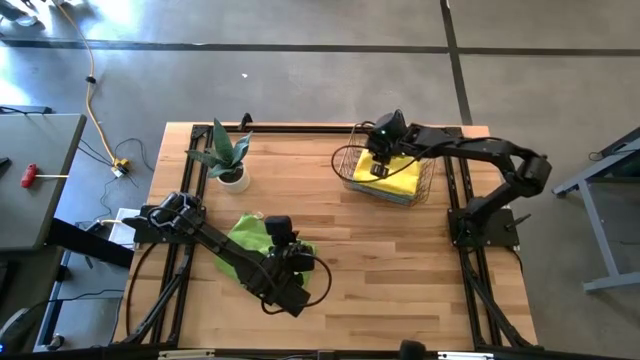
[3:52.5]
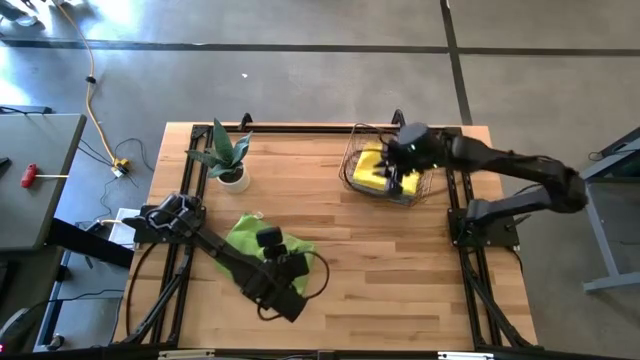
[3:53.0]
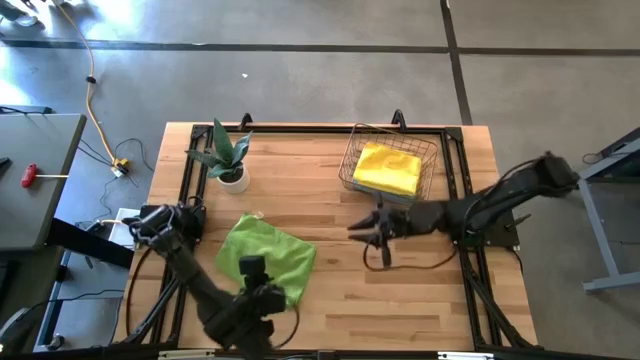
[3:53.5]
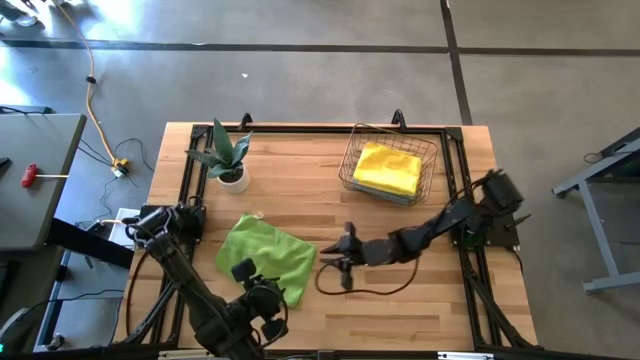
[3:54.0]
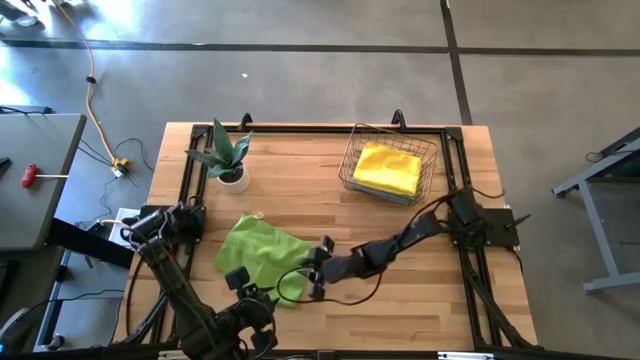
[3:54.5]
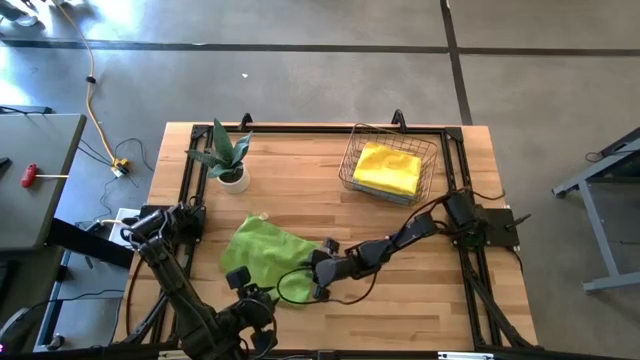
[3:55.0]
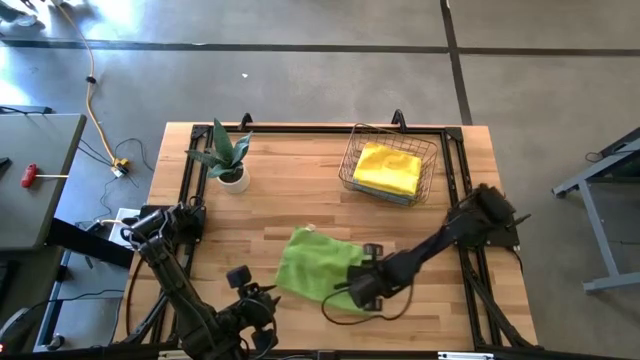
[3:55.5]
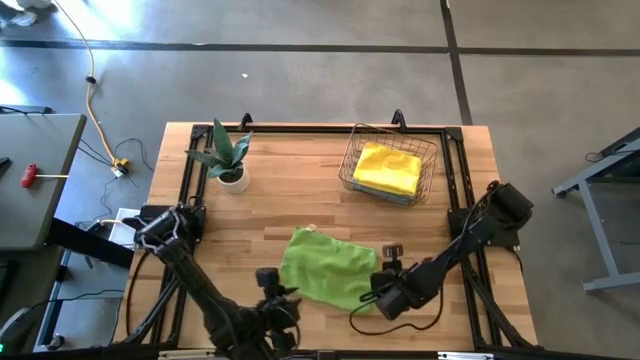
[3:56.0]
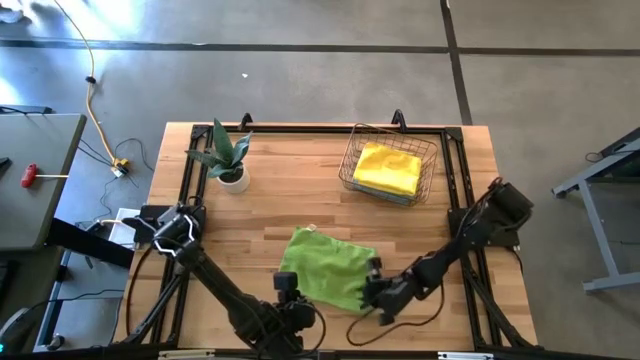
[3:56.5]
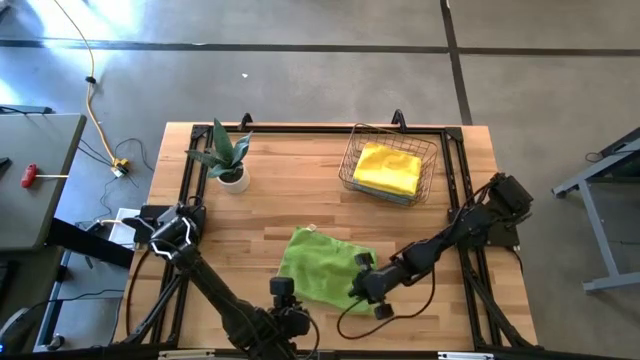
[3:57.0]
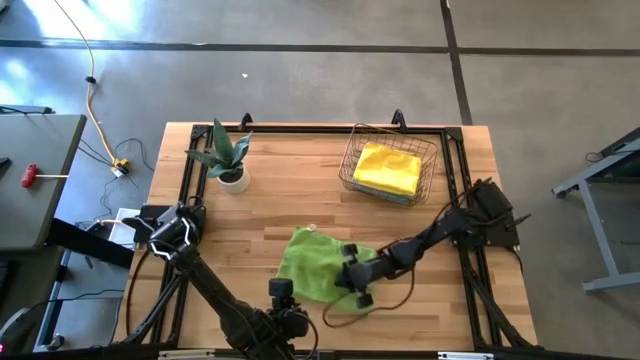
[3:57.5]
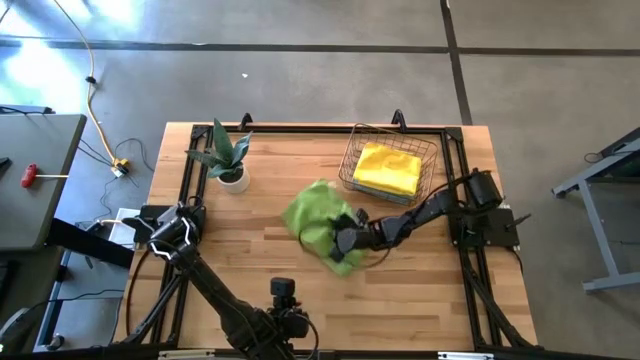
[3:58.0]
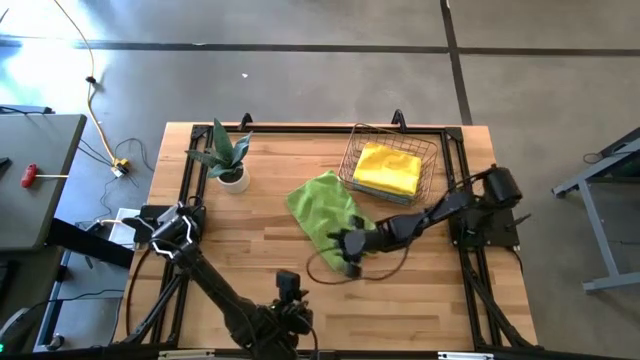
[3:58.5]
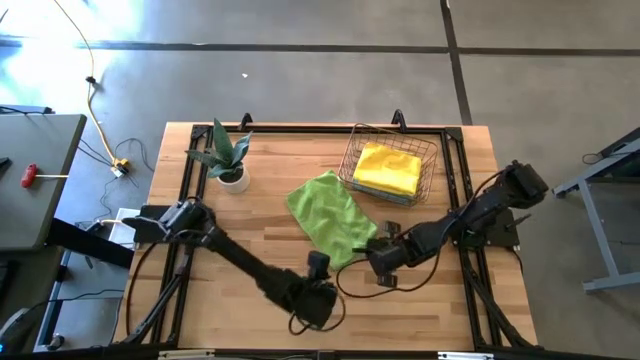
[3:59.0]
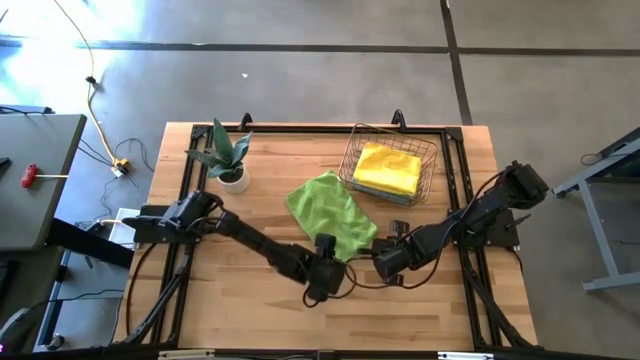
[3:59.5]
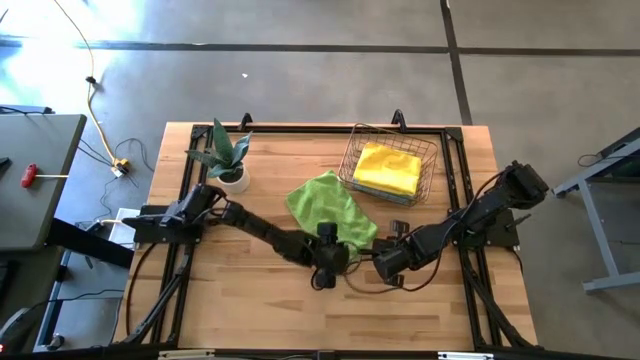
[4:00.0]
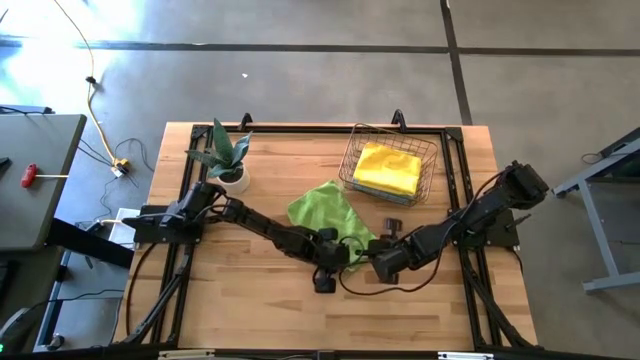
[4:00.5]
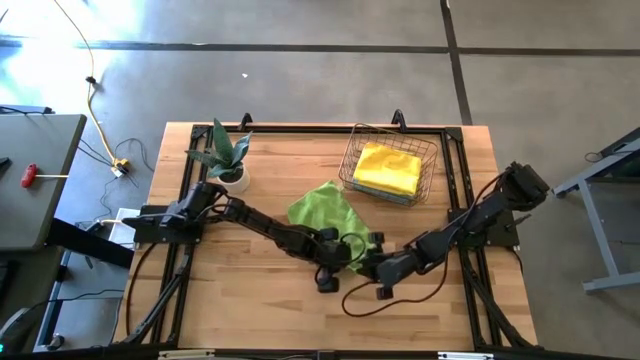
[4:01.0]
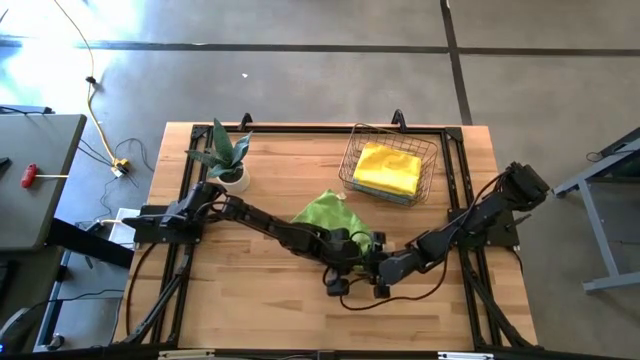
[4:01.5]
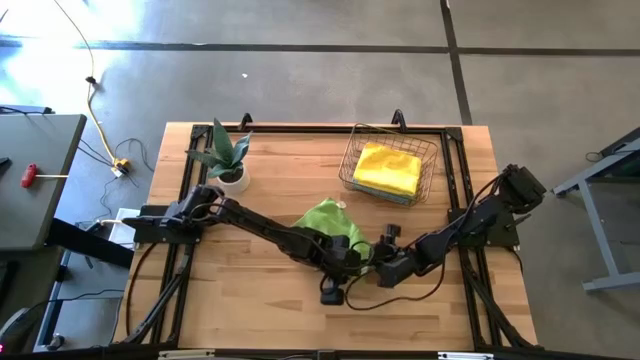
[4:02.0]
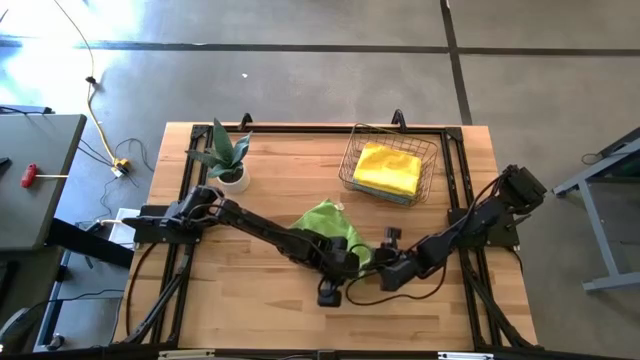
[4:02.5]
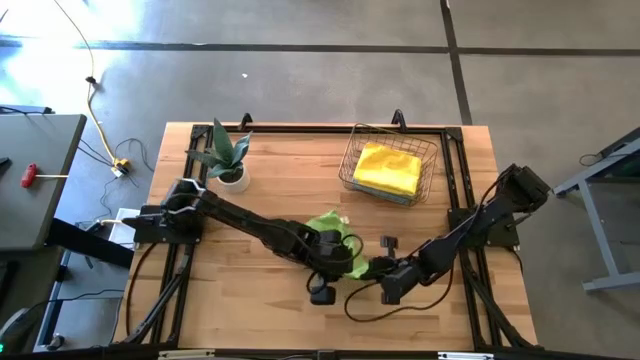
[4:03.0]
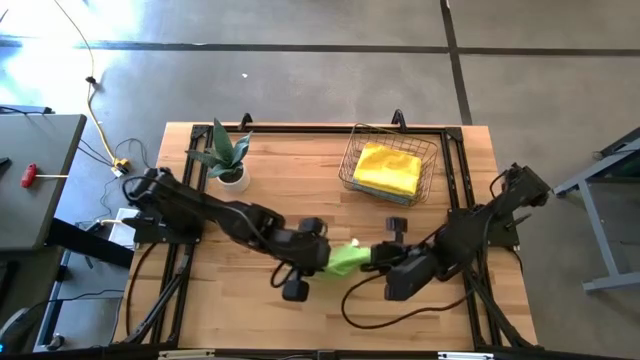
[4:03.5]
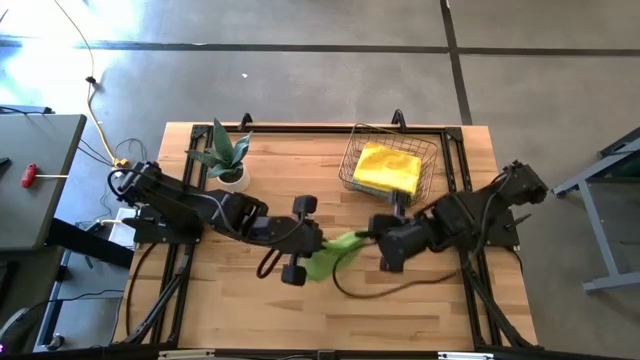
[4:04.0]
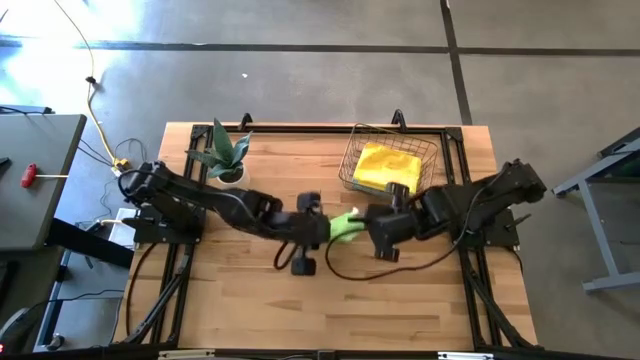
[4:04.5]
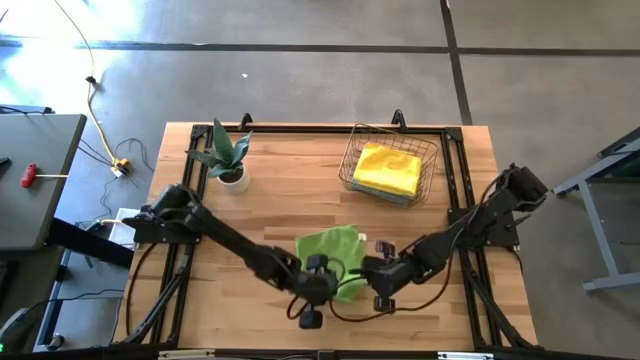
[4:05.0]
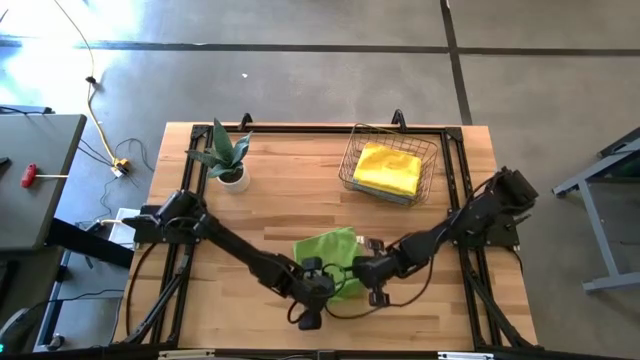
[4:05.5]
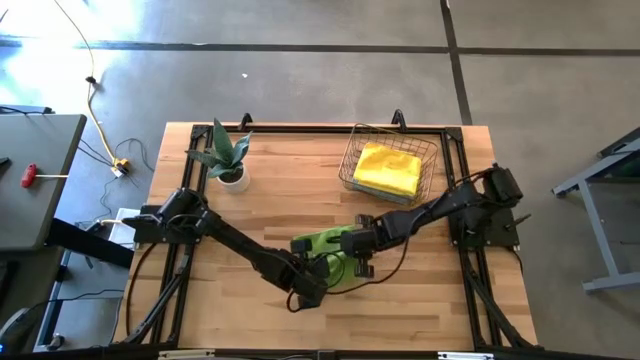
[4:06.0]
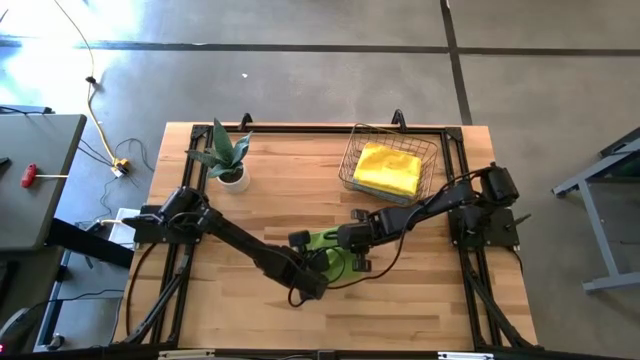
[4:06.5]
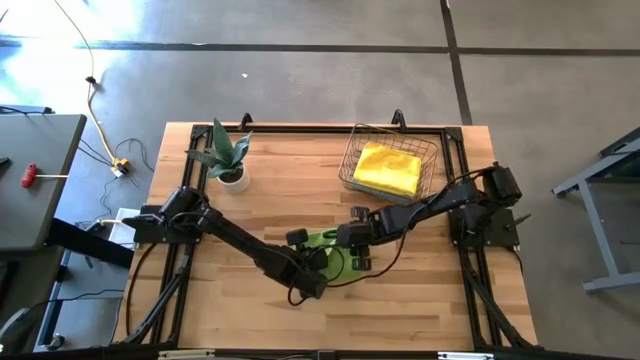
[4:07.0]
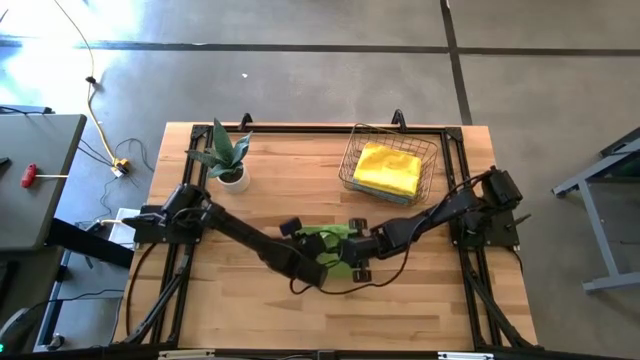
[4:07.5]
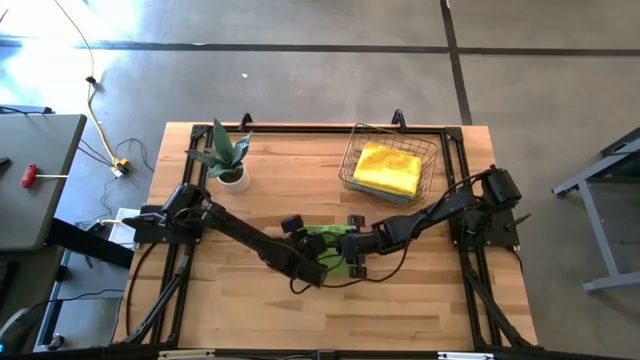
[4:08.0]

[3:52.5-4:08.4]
Task: Fold microfiber towels
Fold the green microfiber towel

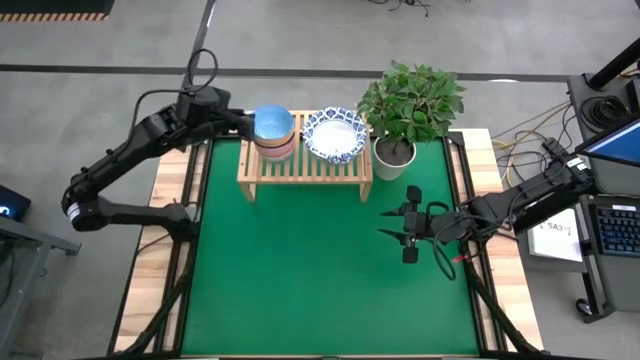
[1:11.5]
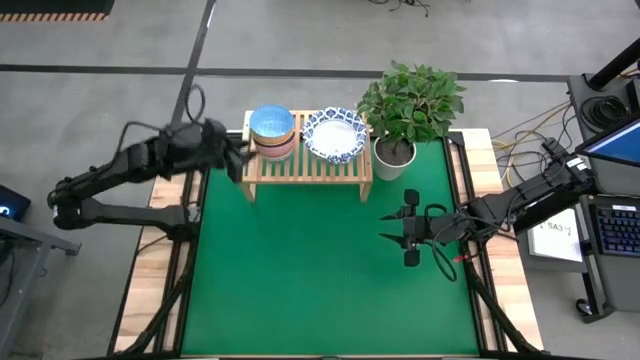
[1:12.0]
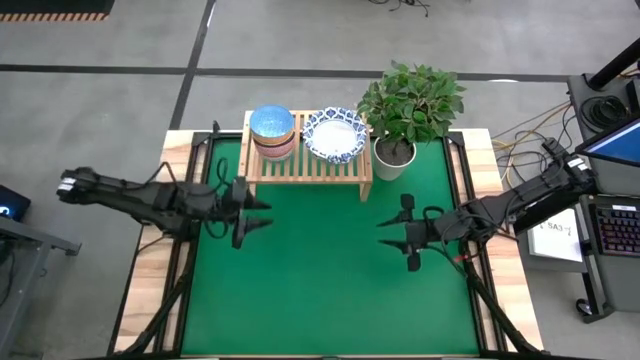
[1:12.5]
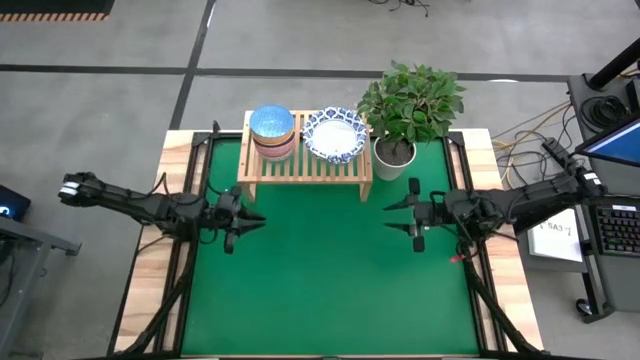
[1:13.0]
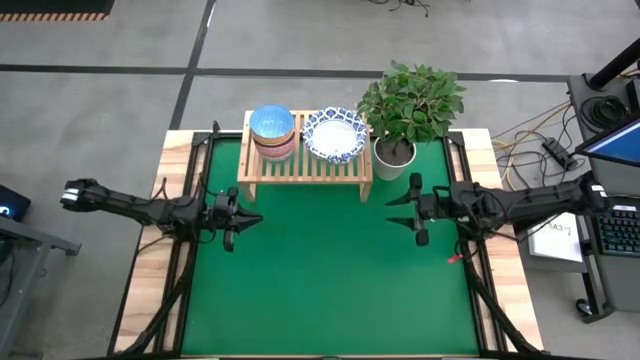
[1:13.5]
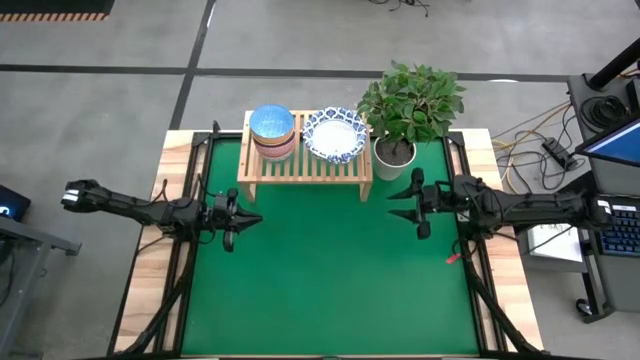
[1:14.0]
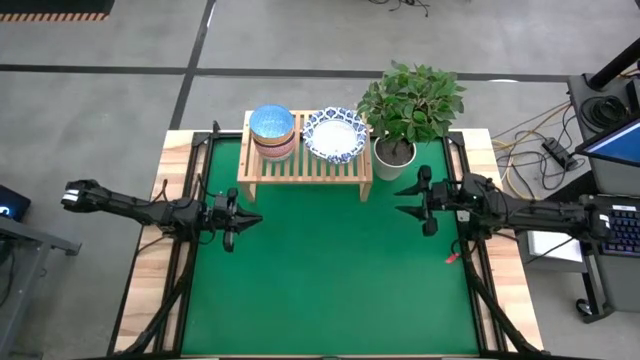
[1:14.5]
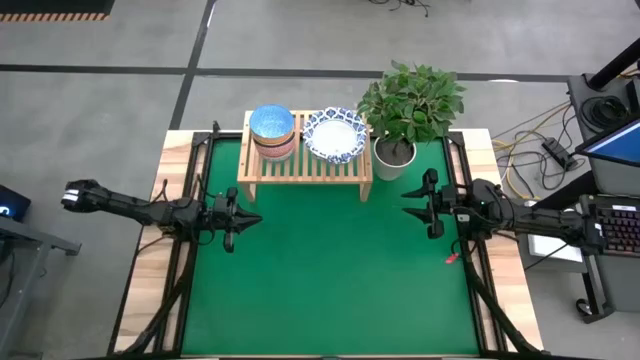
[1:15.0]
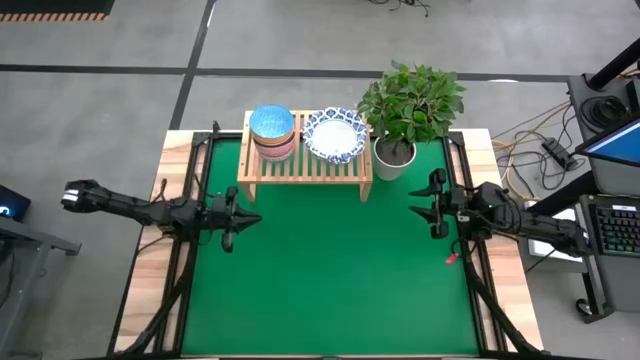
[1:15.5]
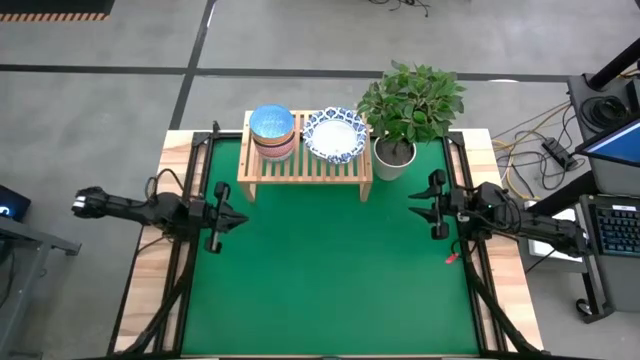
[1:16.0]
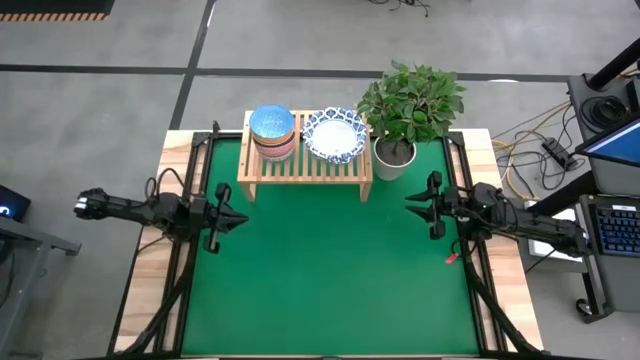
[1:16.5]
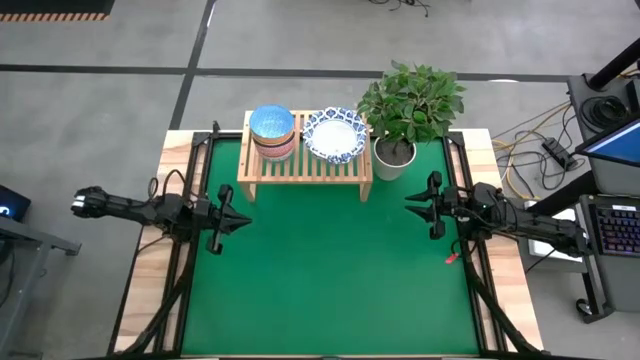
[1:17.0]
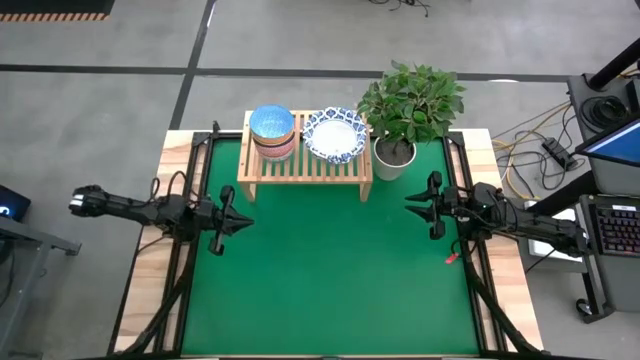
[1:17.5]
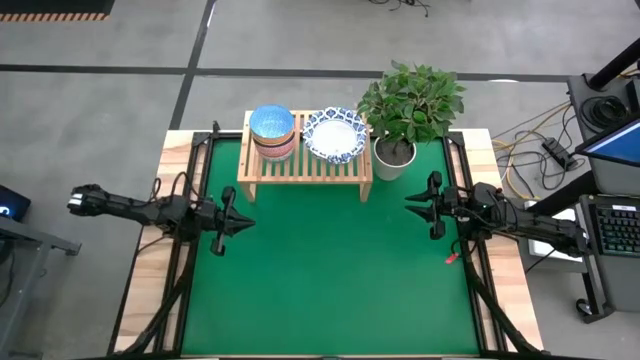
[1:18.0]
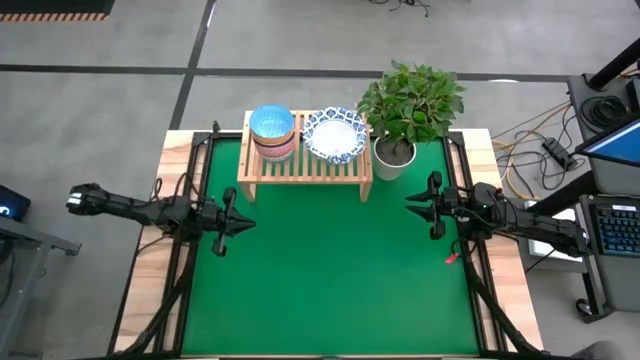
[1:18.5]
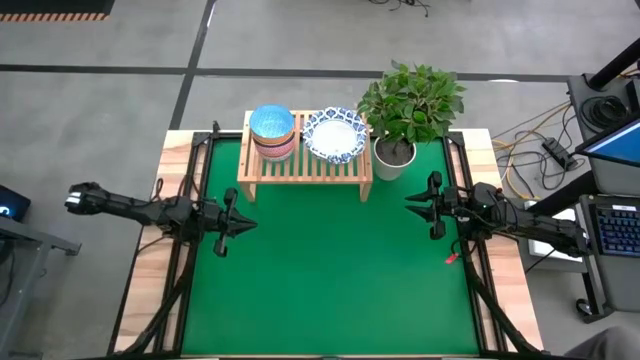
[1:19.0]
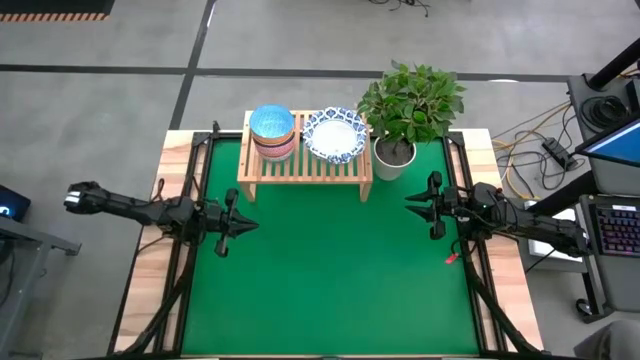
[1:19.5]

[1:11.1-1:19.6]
Task: Place and stack plates onto a shelf
Return to Home Position
